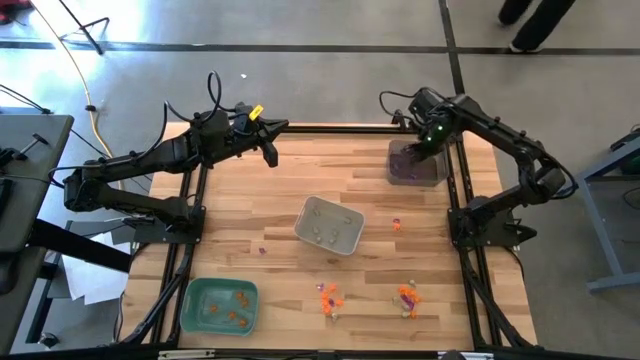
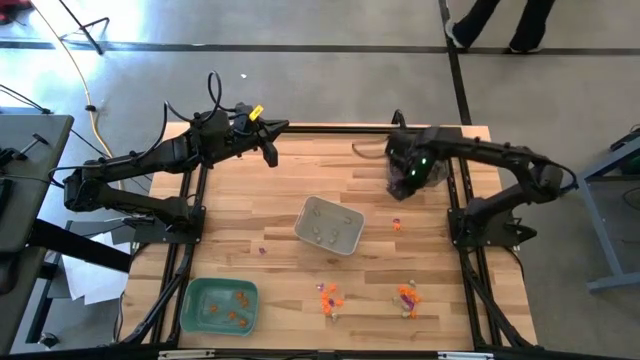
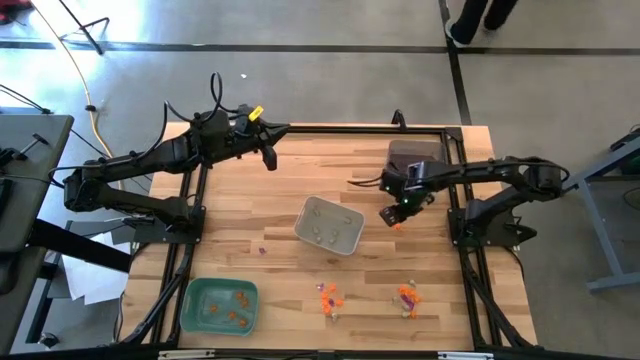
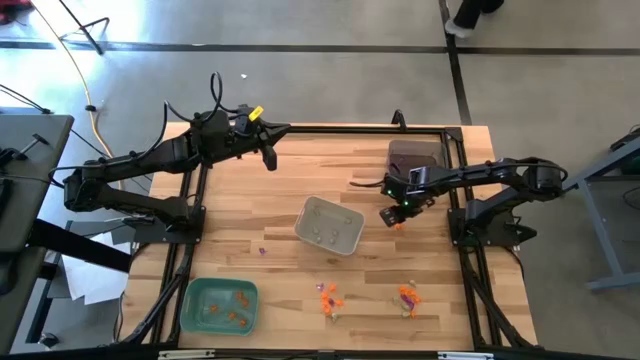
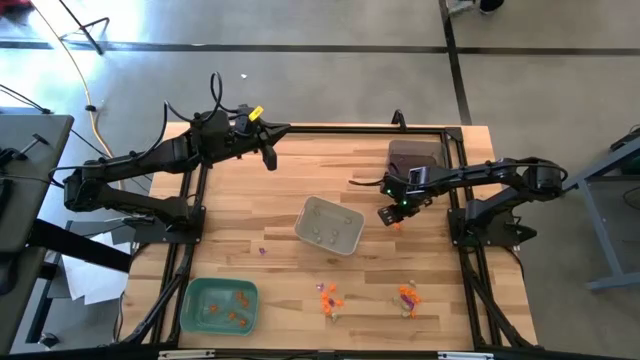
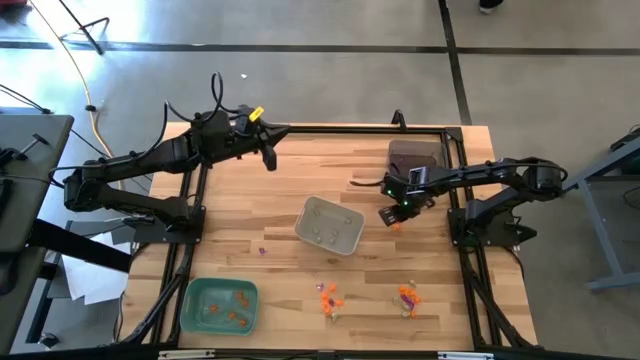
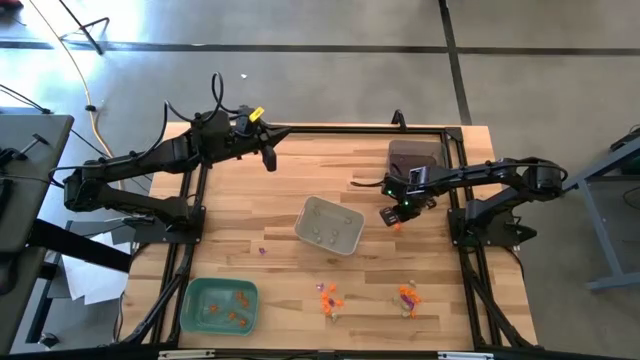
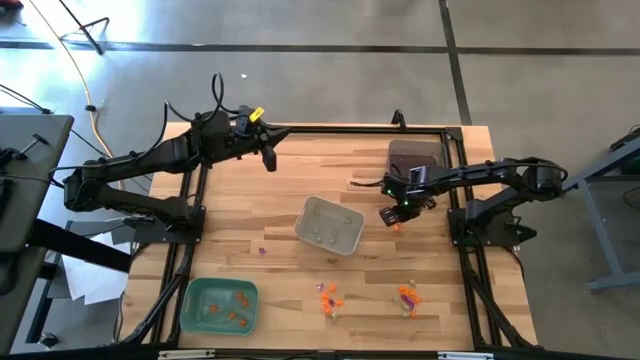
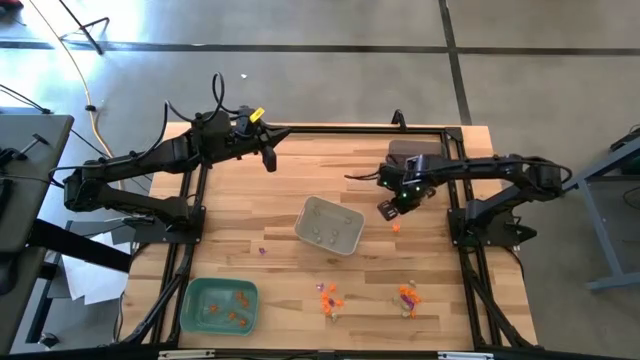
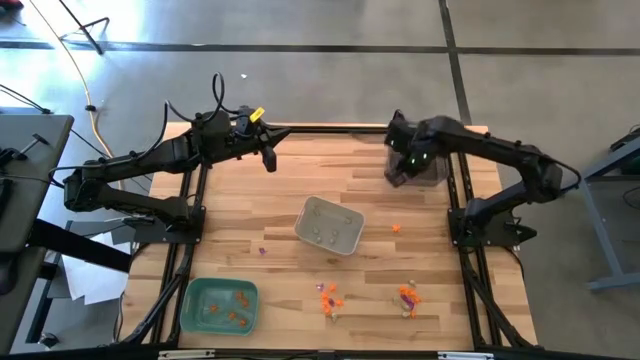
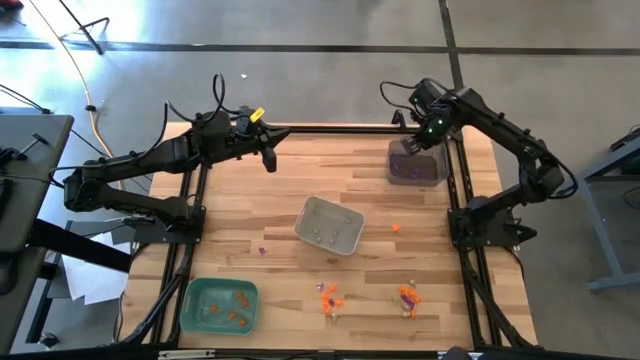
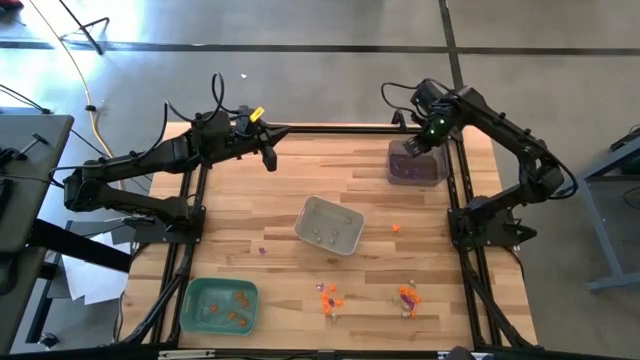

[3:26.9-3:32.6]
Task: Sort Halloween decoration
Put the violet witch hat toy into the black bin

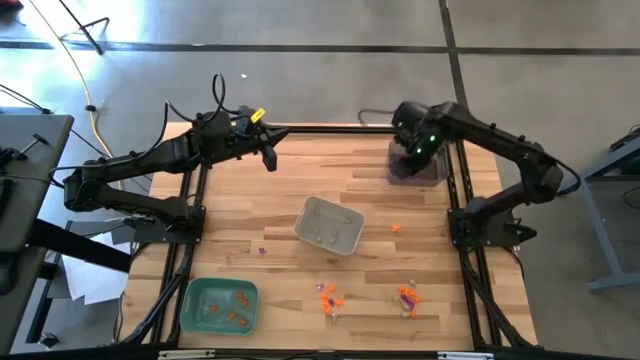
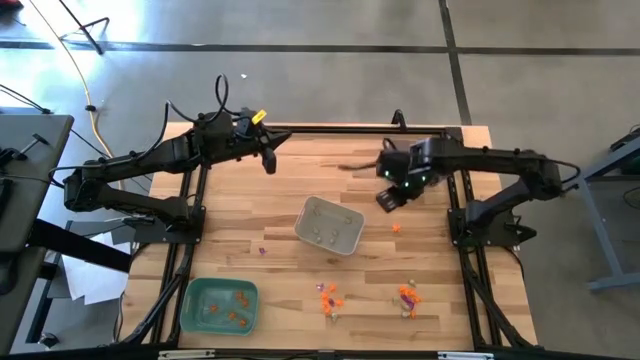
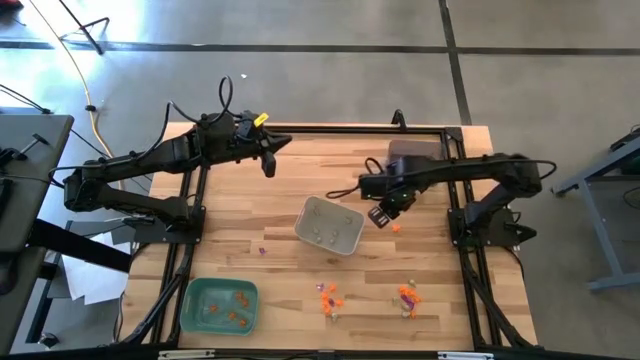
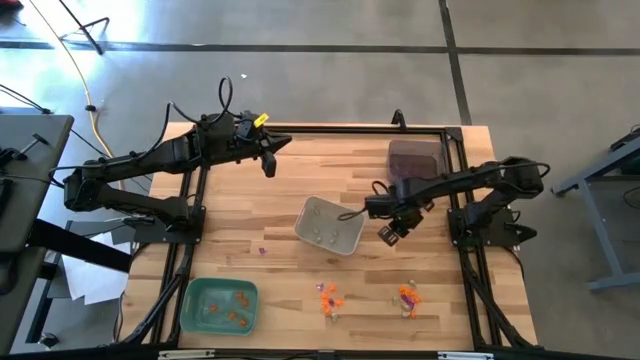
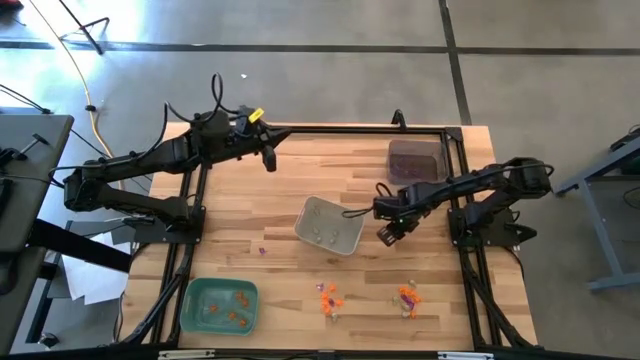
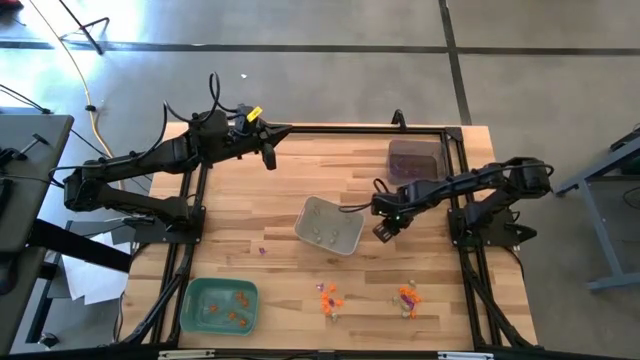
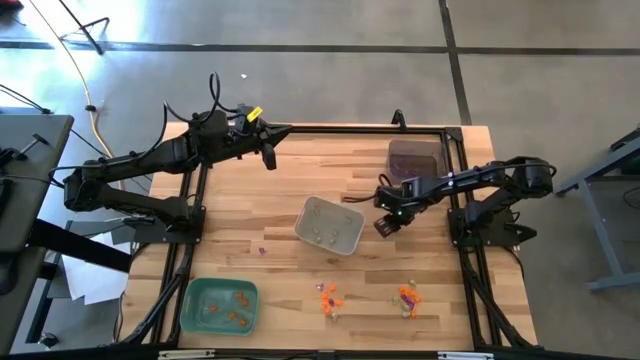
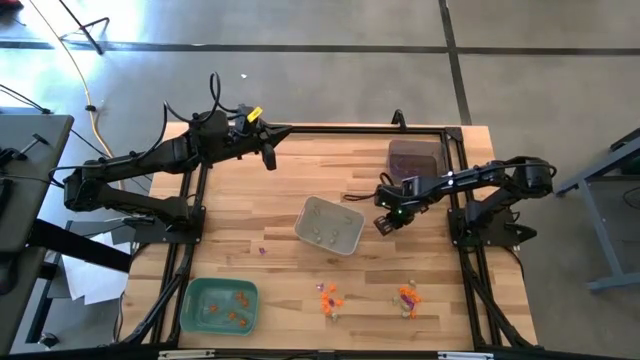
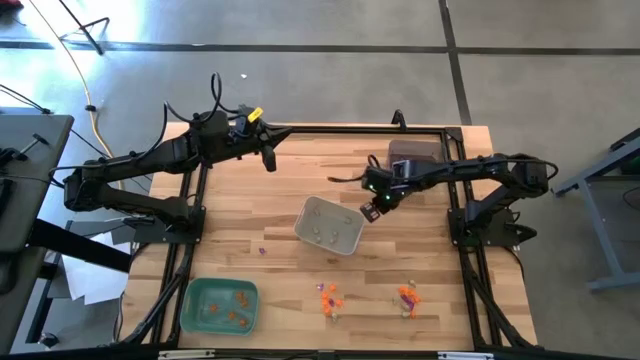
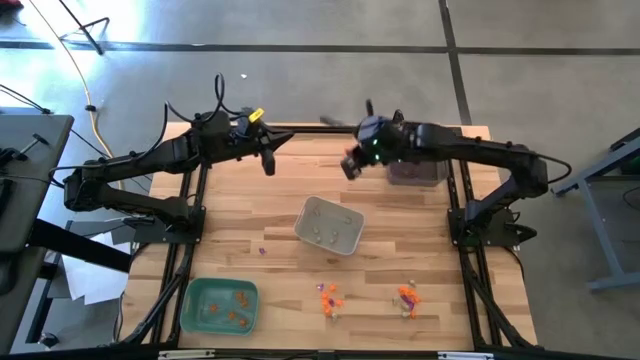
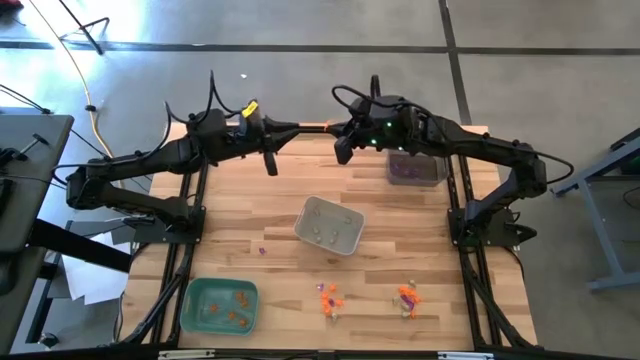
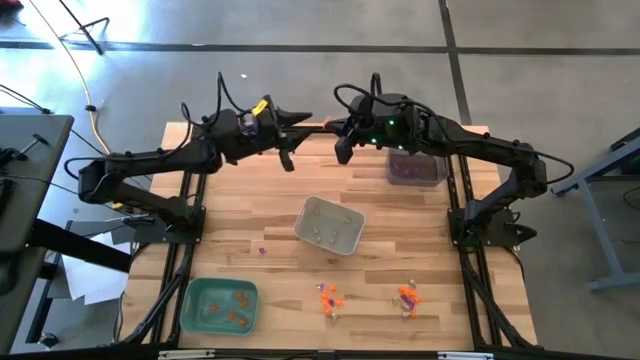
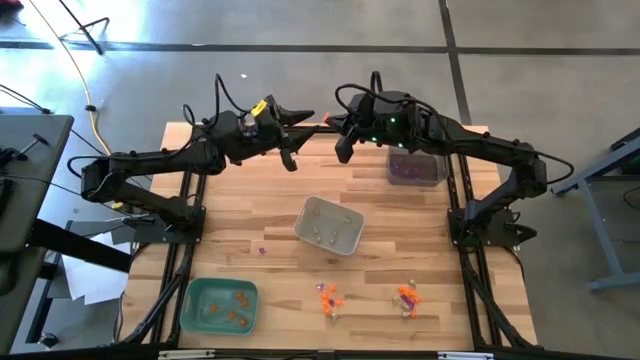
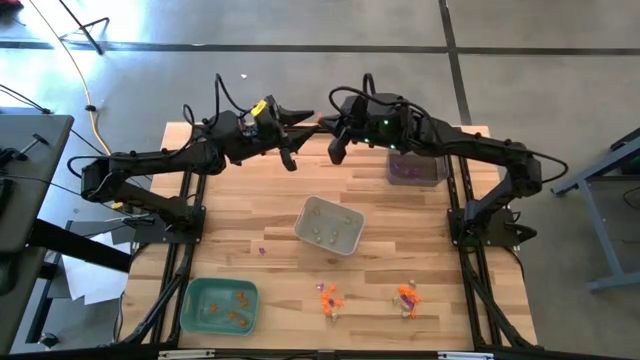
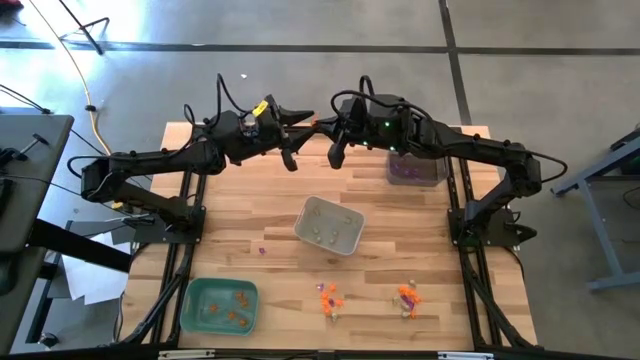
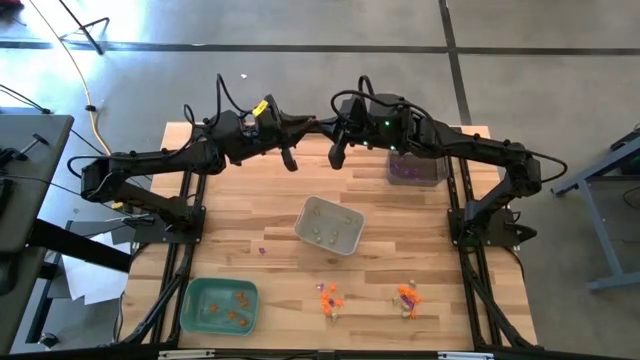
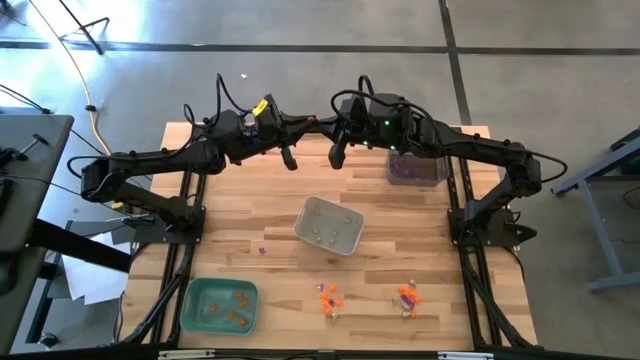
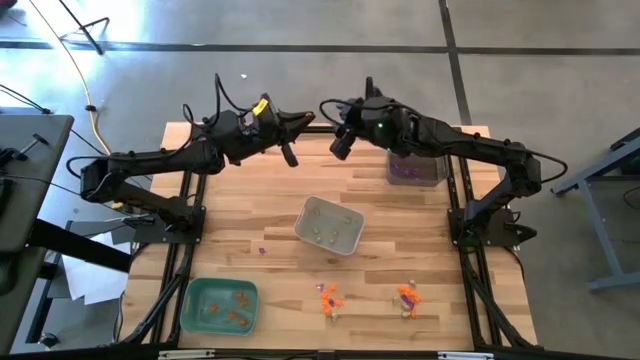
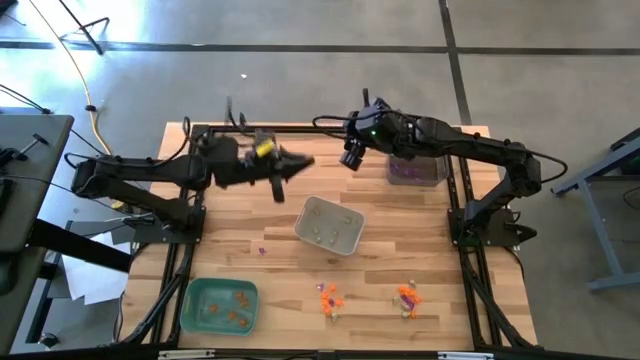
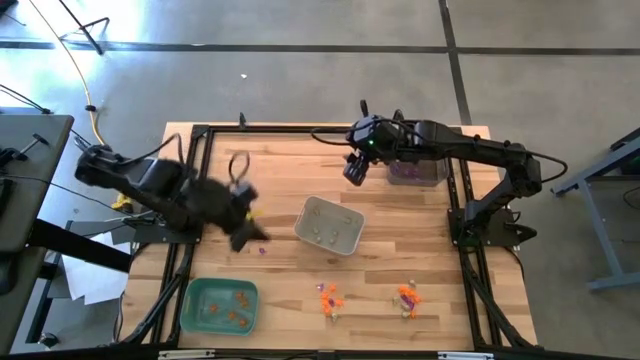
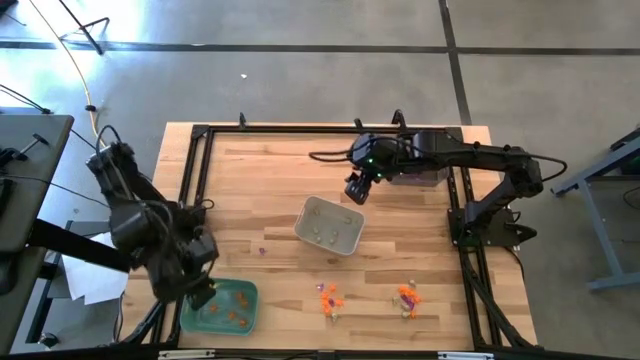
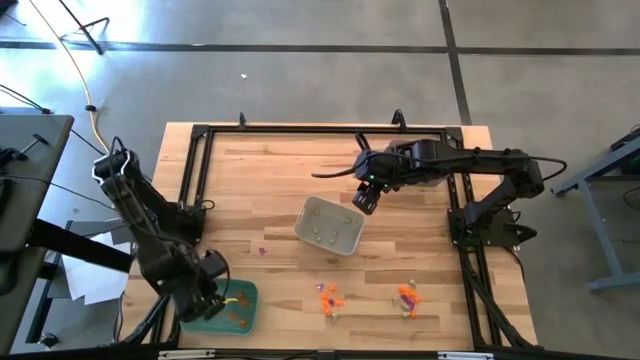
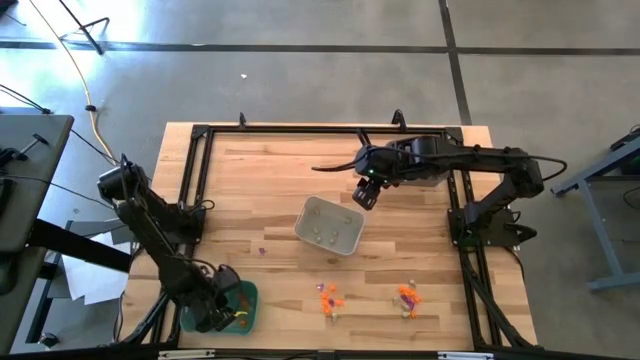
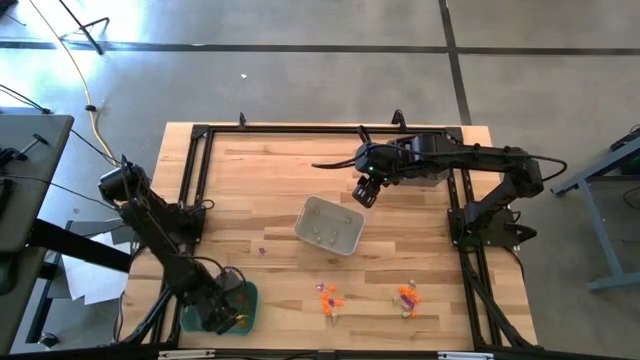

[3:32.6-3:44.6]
Put the orange spider toy into the green bin

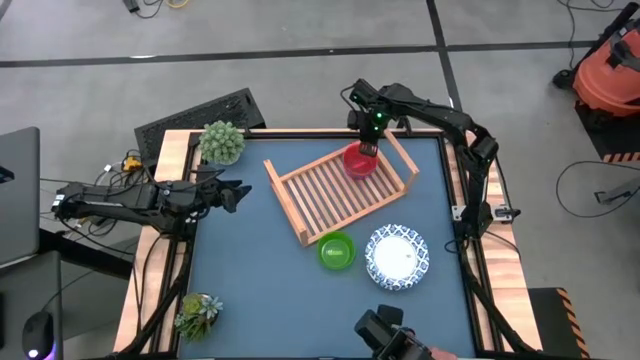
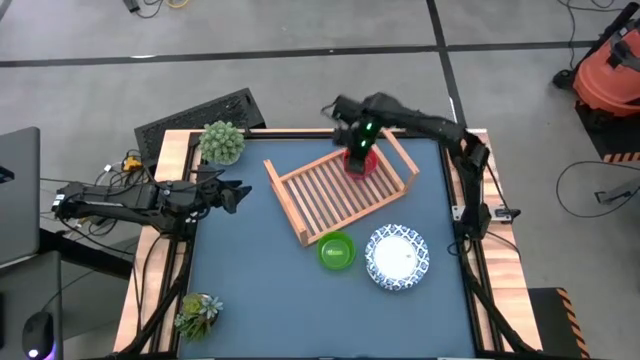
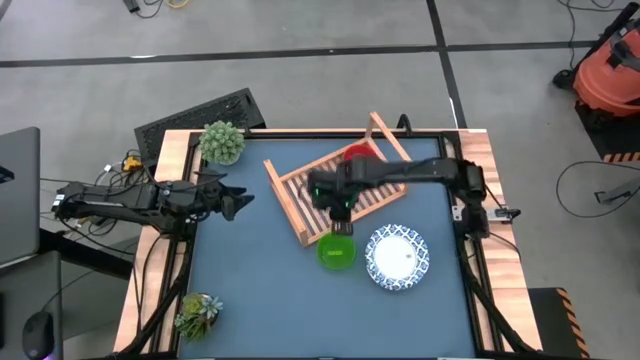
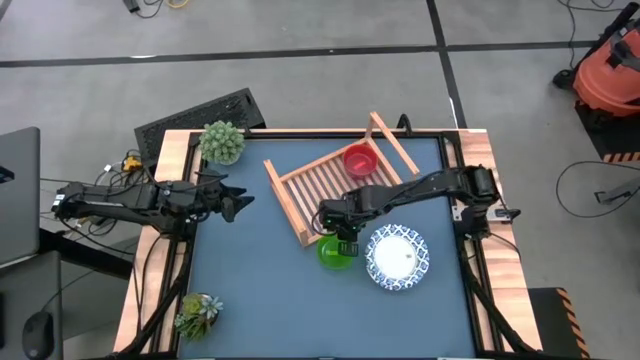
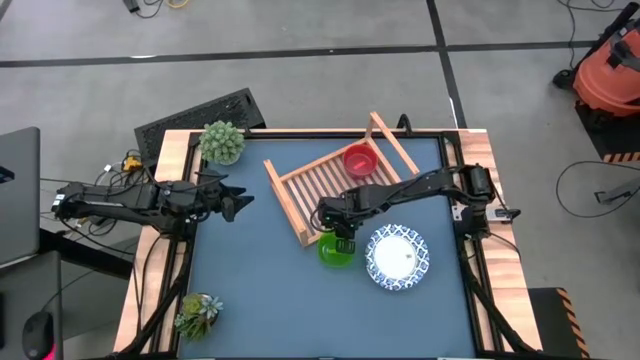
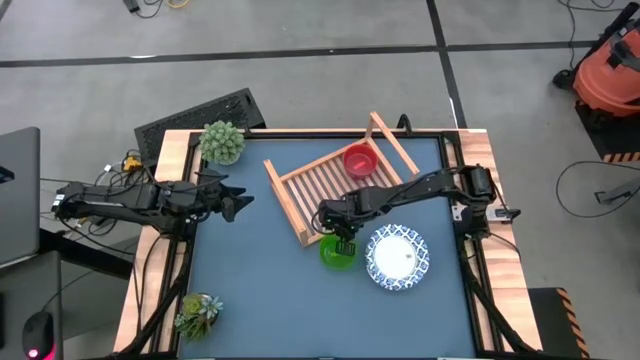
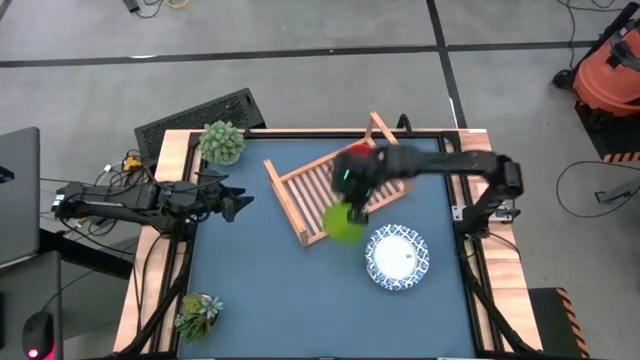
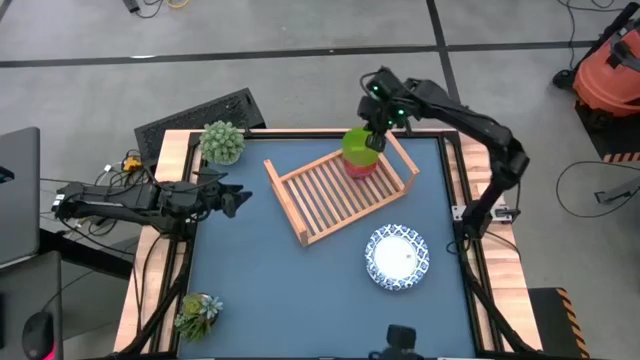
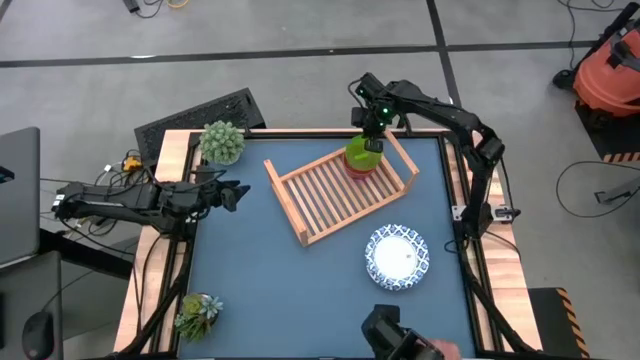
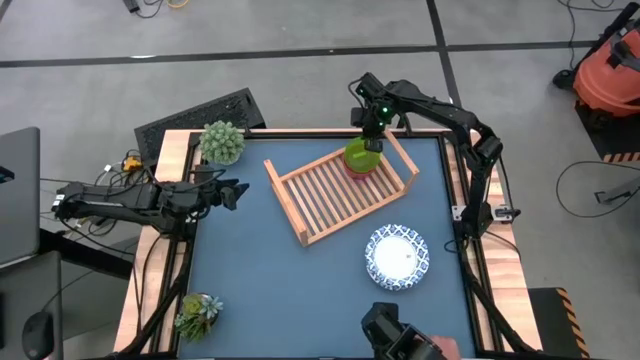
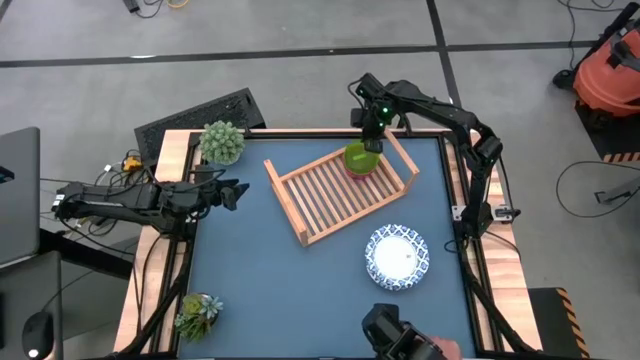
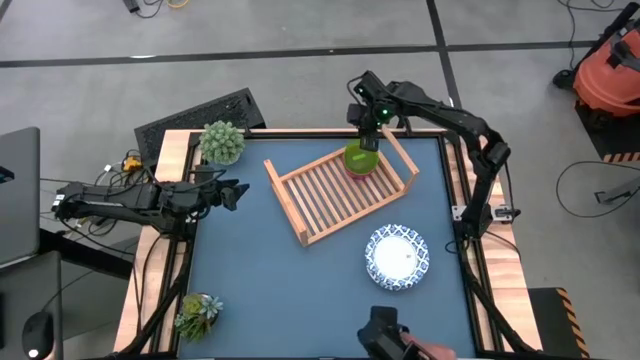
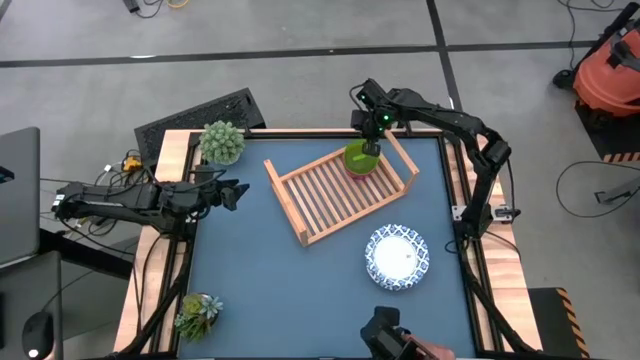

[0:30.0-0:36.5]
Task: Place and stack bowls onto a shelf
Stack the green bowl on top of the orange bowl on the shelf
